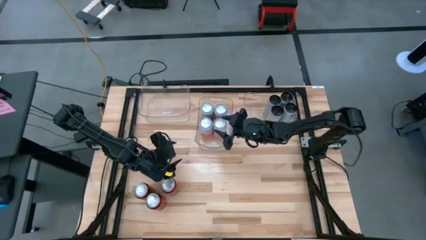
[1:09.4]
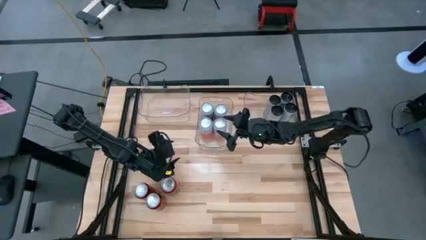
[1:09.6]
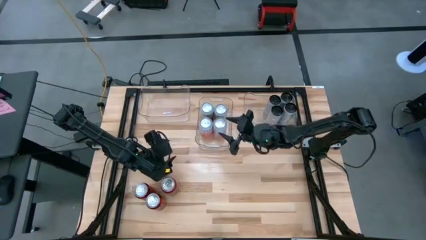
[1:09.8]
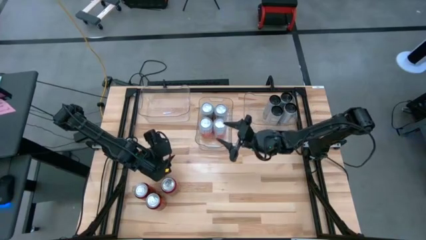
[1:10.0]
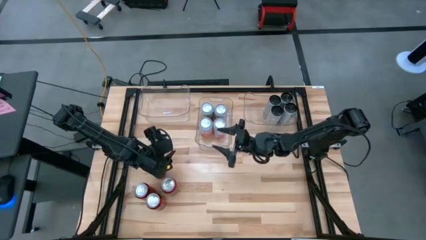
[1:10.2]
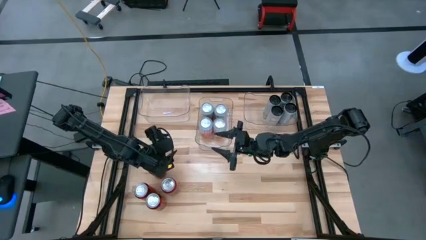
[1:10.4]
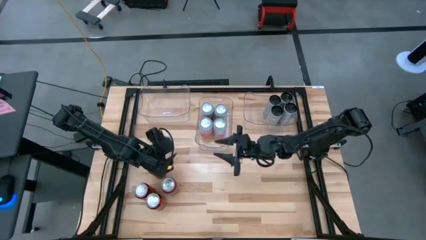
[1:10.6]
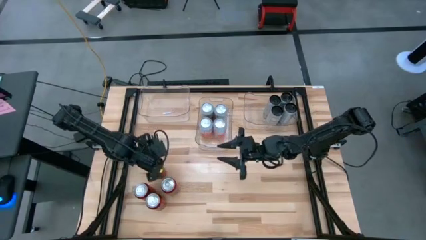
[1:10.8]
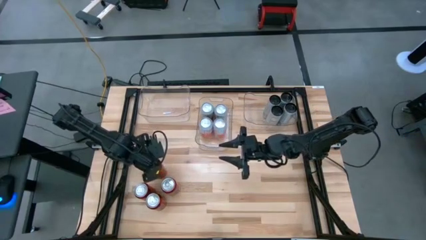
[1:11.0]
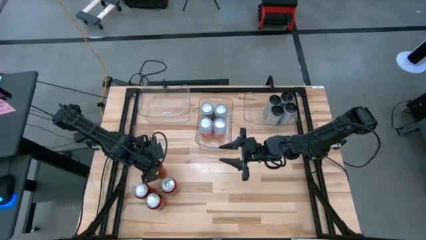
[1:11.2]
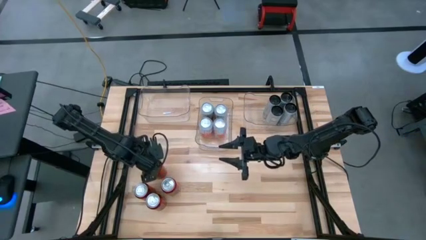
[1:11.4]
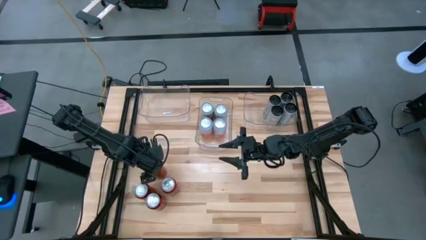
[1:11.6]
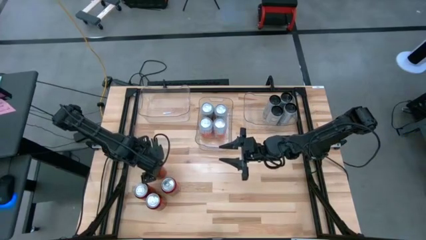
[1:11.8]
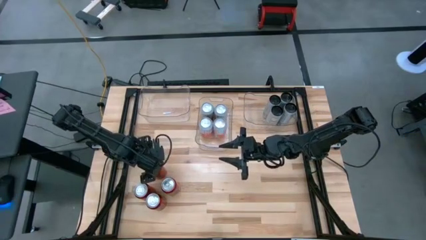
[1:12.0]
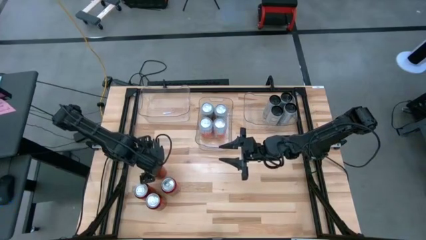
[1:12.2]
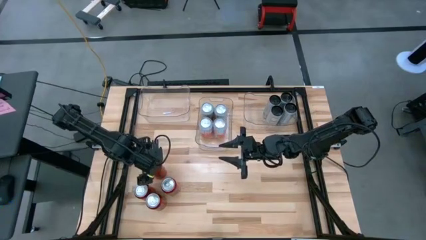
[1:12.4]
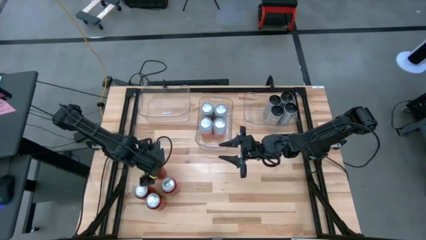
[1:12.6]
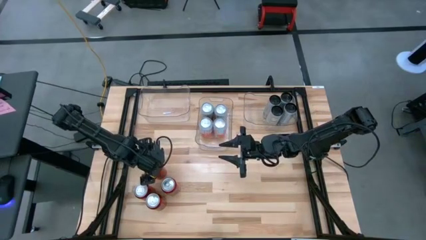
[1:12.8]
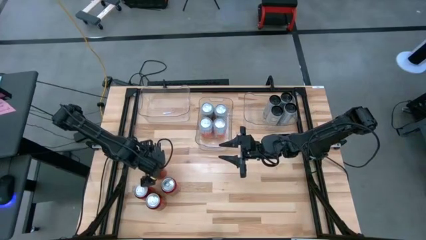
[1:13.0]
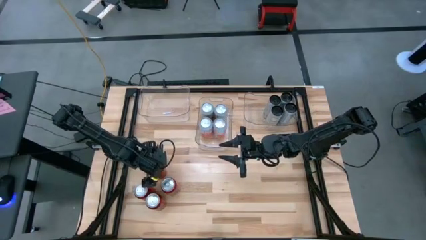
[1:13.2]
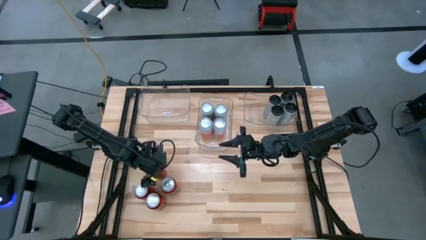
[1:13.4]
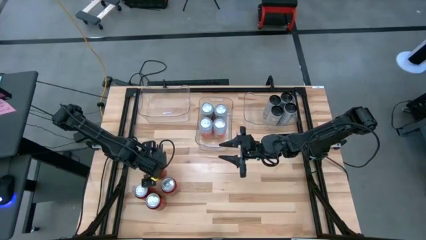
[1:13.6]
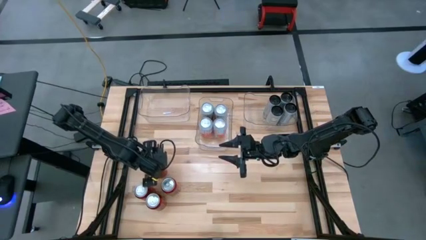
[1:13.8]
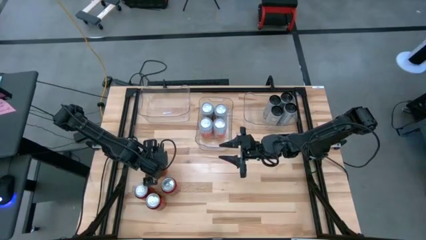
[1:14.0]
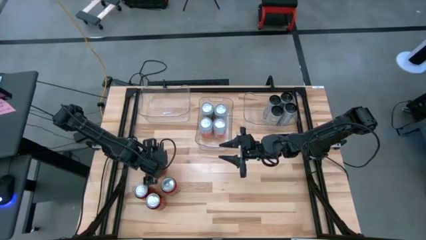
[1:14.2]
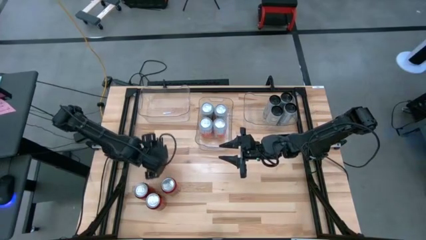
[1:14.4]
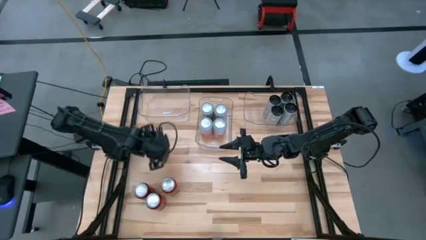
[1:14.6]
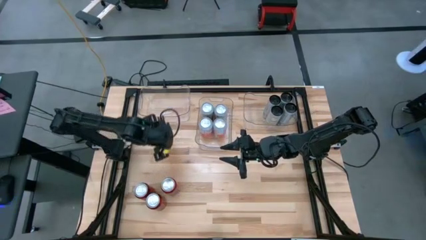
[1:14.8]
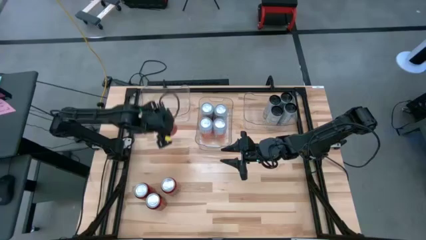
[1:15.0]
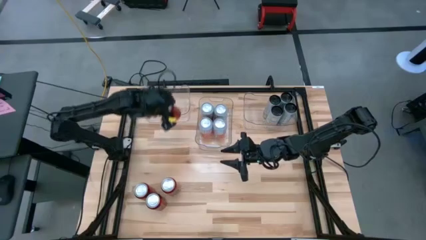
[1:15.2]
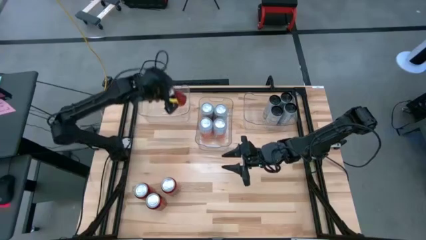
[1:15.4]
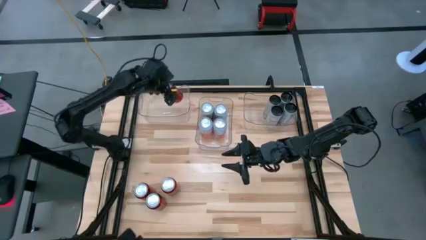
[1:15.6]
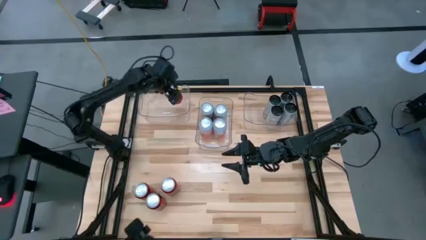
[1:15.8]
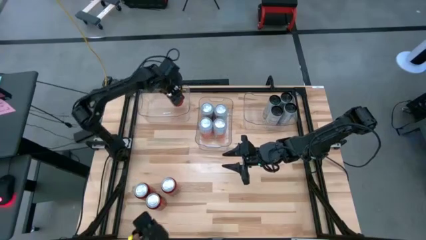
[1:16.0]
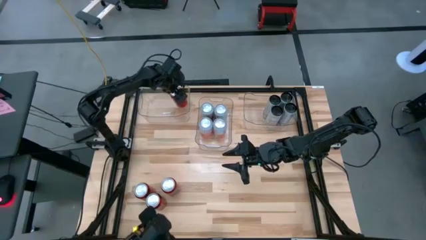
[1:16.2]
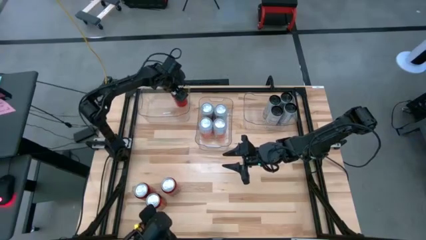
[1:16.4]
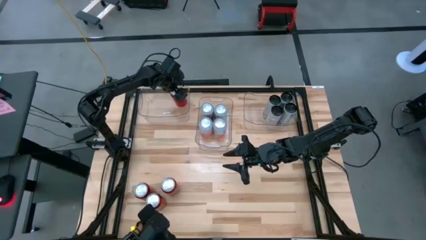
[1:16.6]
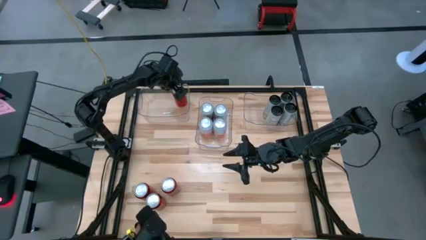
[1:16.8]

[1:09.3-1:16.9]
Task: Sort soda cans
Put the top red soda can in the left transparent bin

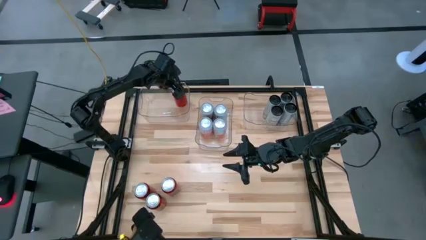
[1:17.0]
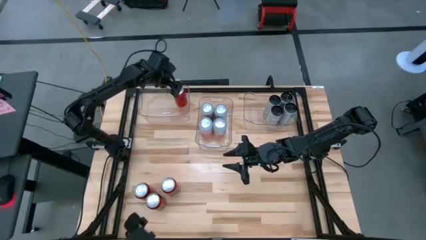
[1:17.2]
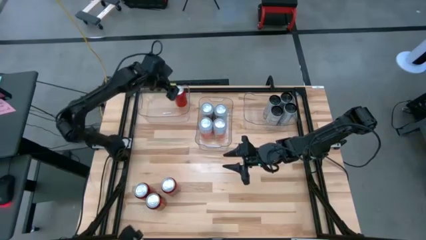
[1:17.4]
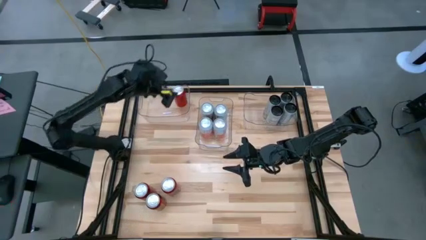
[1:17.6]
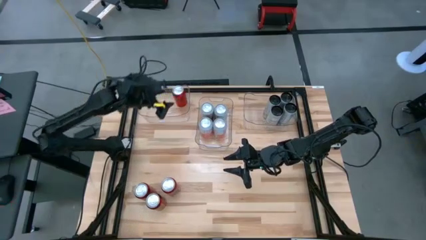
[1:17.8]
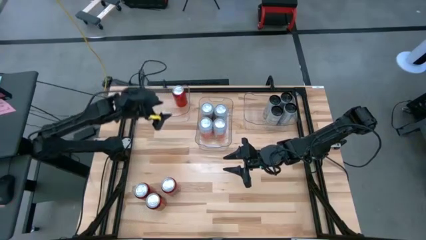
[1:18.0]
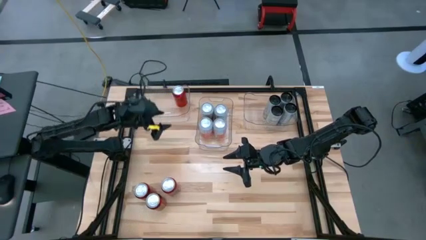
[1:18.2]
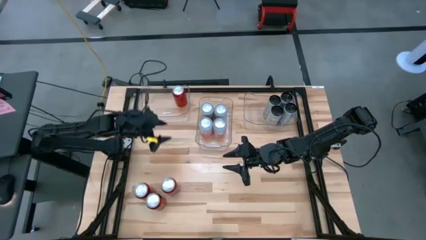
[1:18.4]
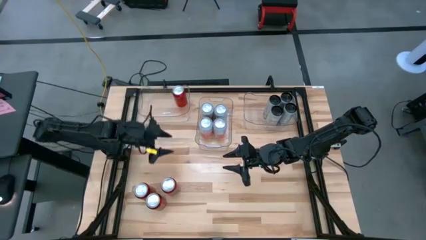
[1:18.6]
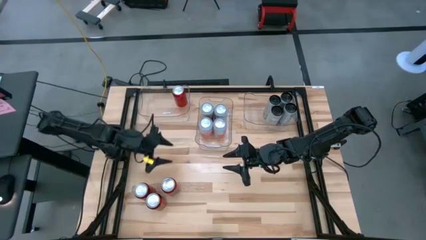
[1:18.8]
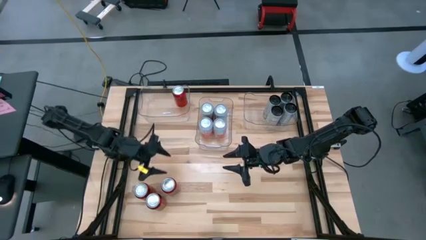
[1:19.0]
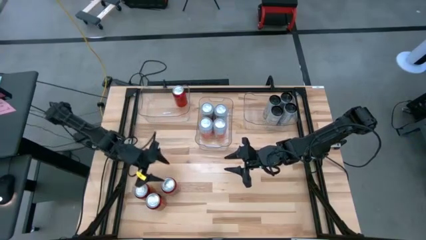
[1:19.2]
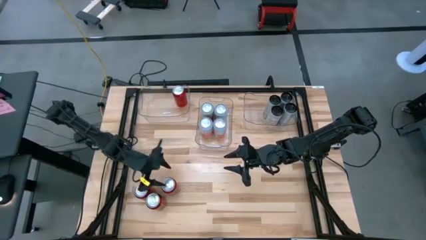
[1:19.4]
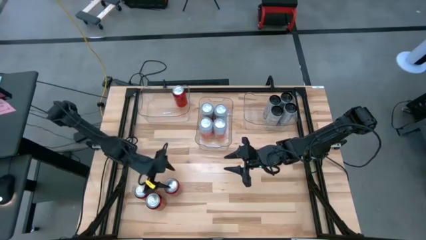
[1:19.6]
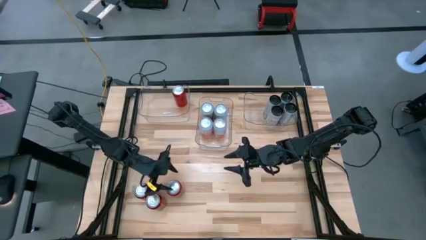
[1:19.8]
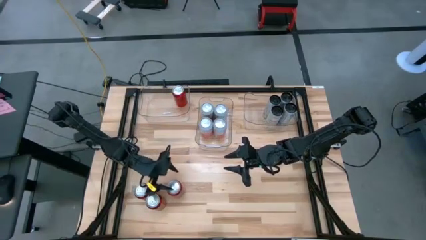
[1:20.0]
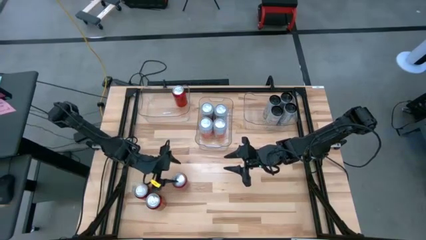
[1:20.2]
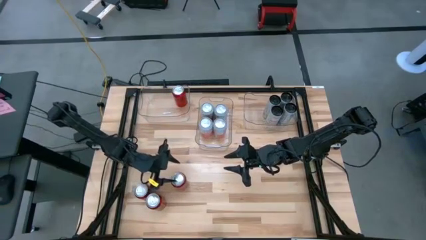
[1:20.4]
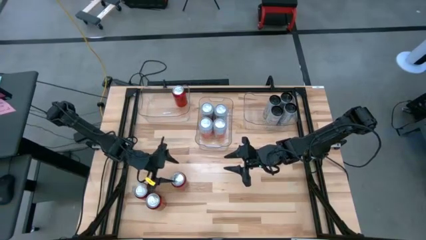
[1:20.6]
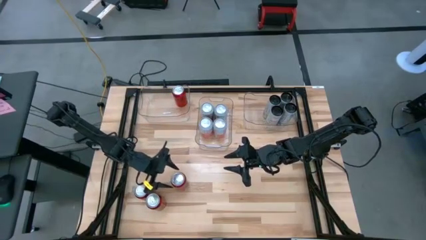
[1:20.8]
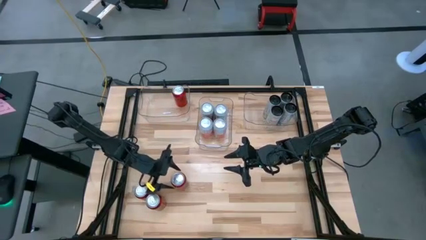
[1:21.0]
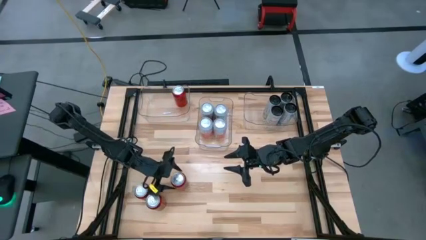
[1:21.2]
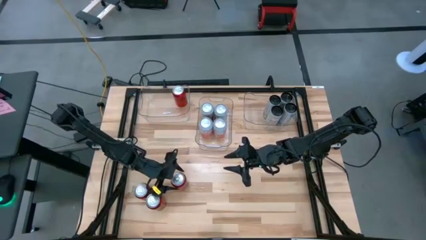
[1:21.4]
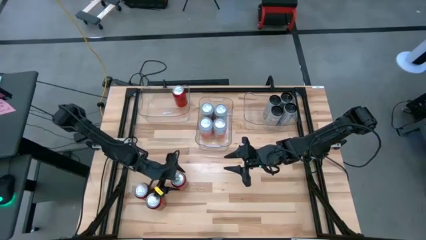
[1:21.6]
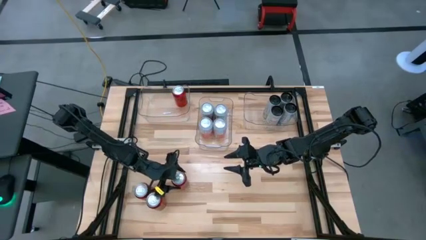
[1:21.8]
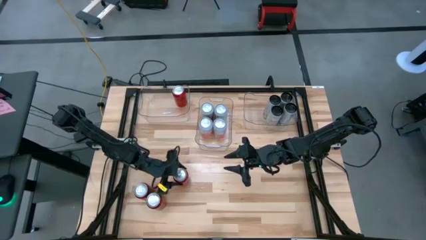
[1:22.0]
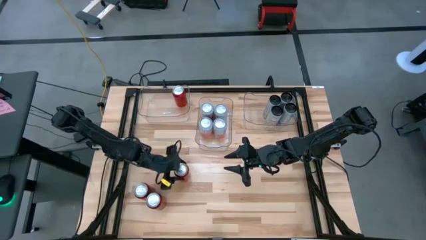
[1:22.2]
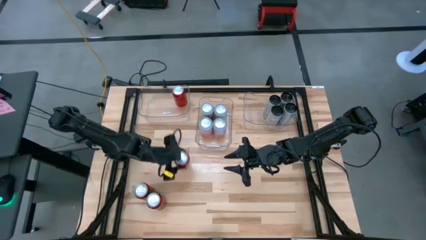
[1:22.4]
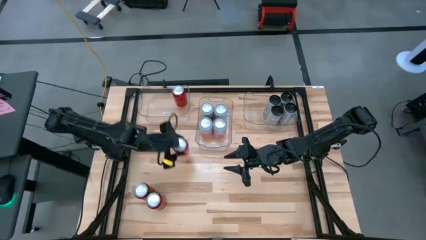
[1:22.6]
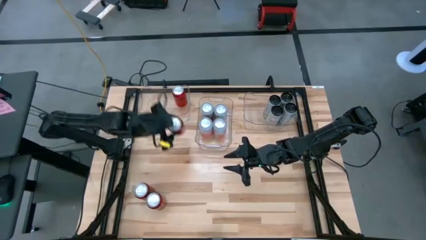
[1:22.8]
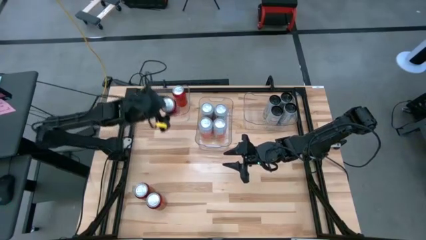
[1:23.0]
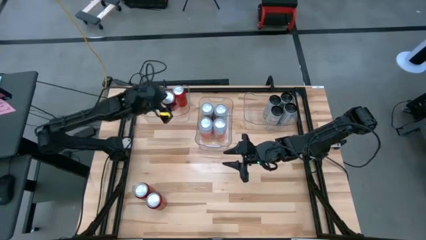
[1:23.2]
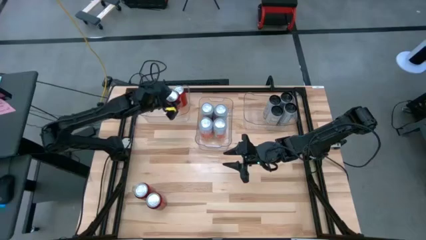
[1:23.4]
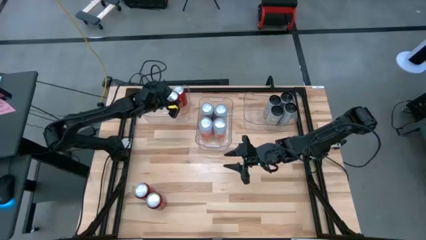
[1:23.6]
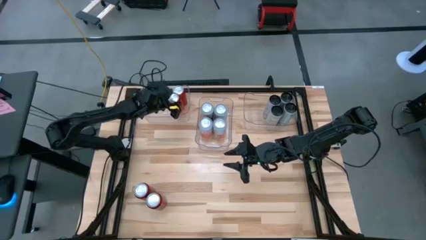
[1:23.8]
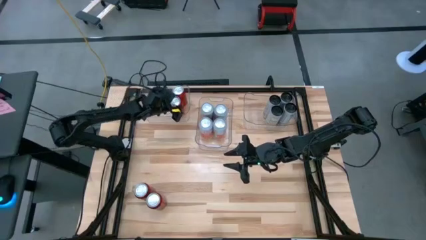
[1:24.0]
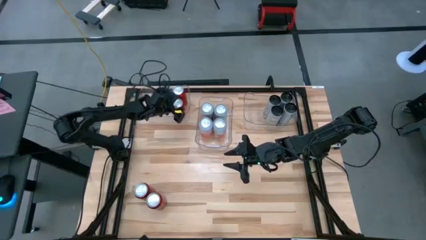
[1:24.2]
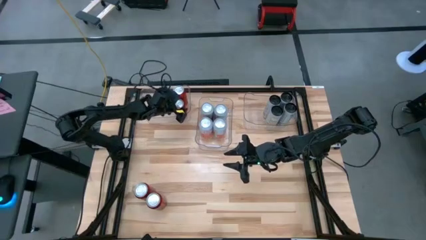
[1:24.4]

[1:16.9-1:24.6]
Put the right red soda can in the left transparent bin

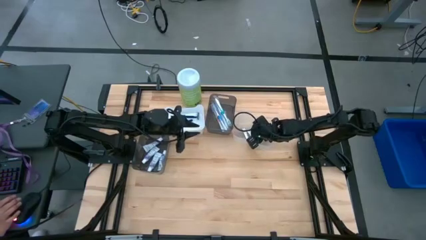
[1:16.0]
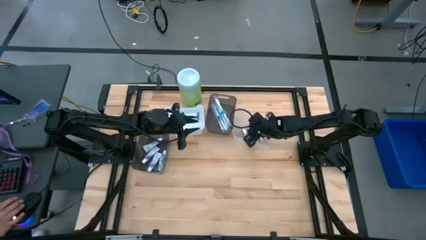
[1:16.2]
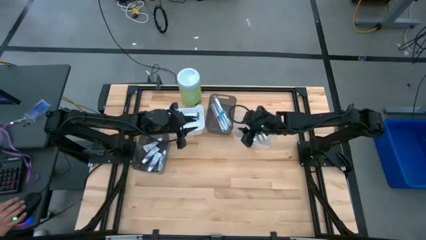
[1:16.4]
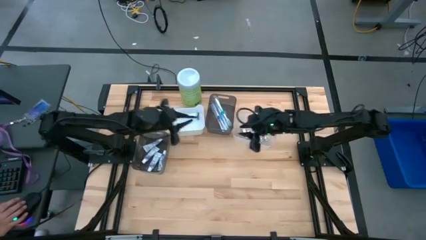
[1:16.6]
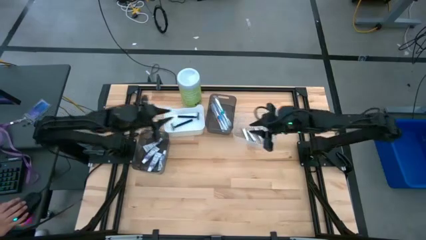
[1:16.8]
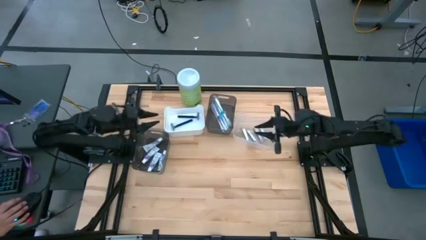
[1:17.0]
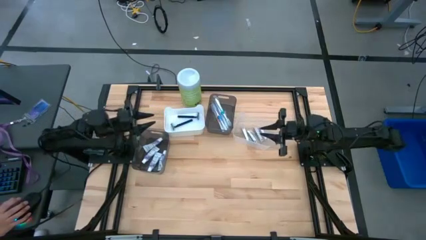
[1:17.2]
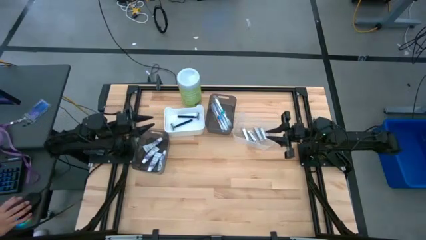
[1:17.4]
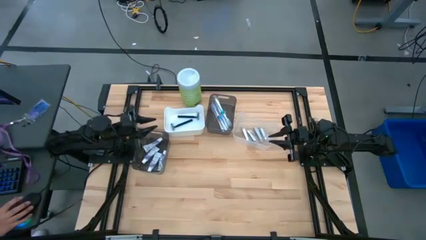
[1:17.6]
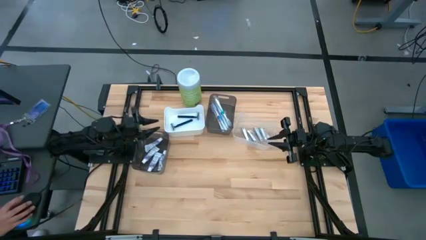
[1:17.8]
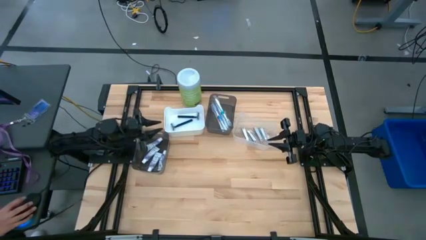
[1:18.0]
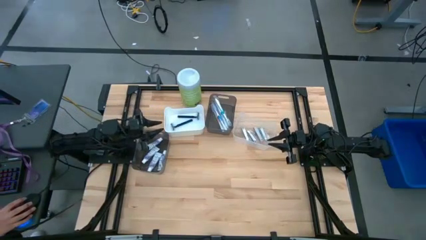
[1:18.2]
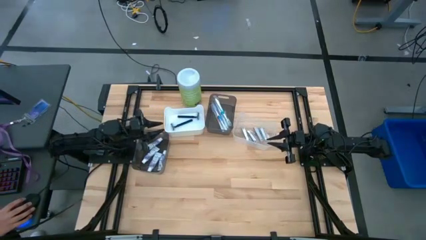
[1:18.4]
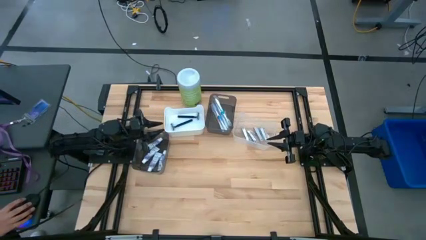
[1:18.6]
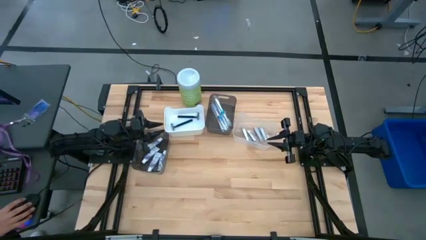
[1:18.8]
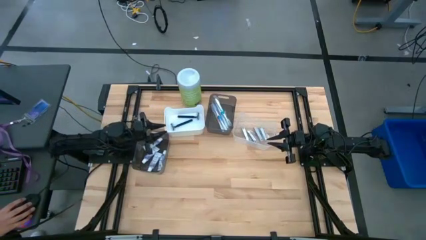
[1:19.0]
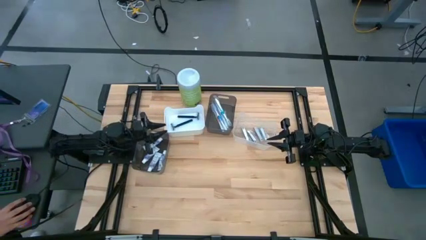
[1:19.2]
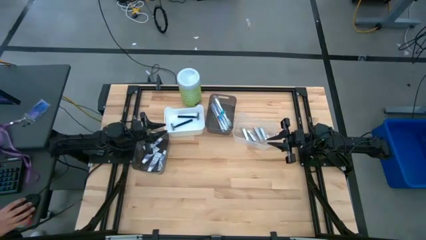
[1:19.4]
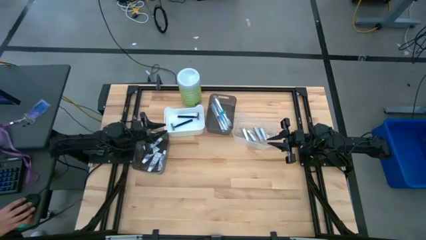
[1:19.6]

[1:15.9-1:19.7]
Task: Pick & Place Travel size toiletries
Return to Home Position
